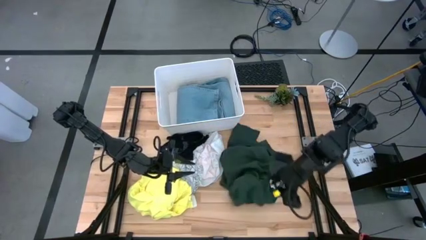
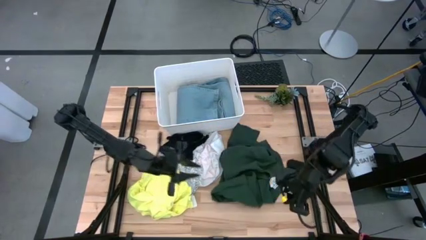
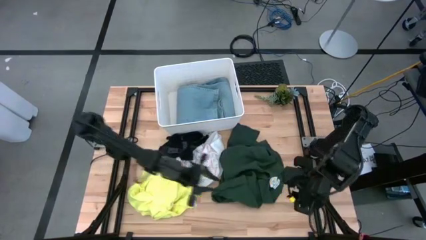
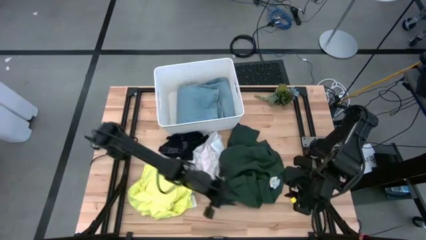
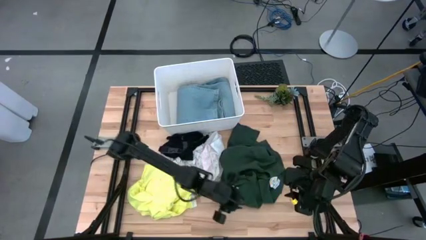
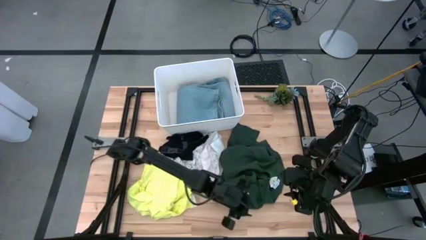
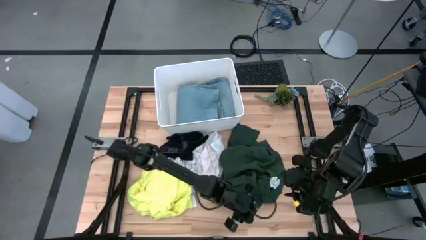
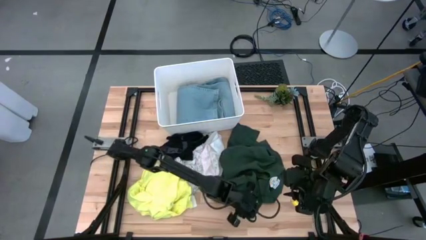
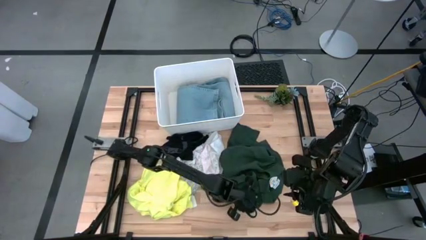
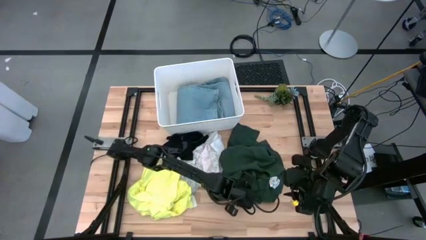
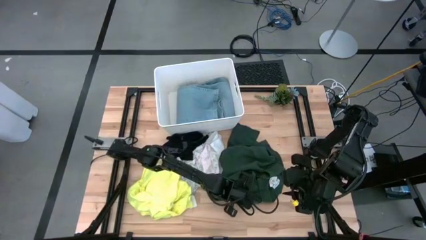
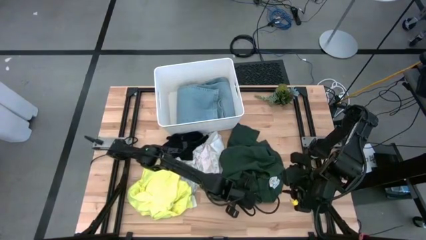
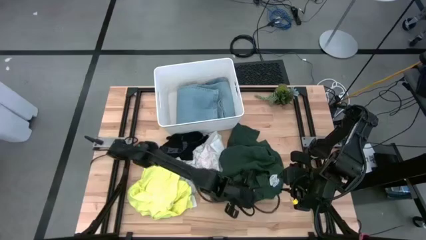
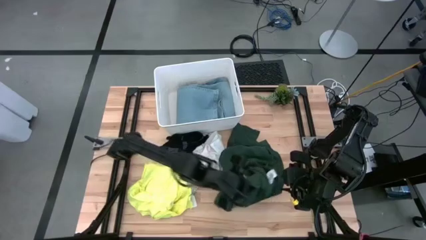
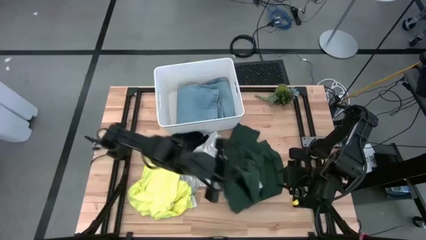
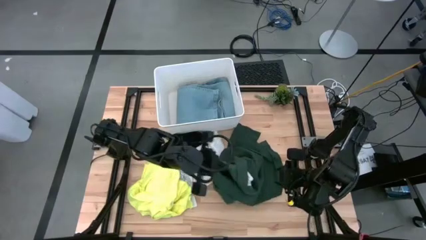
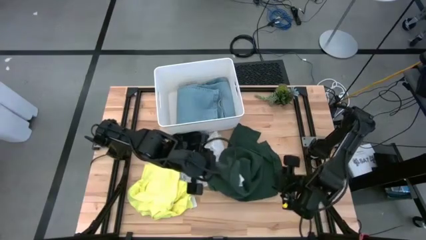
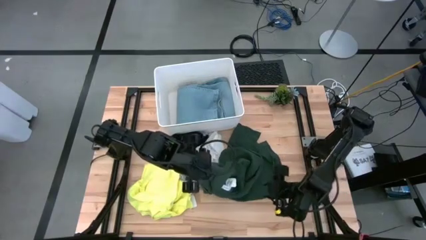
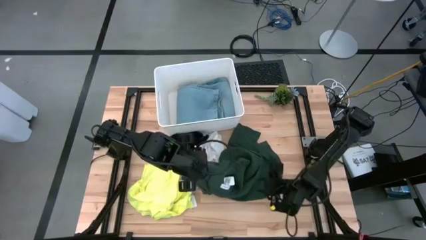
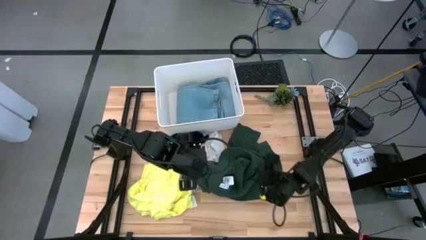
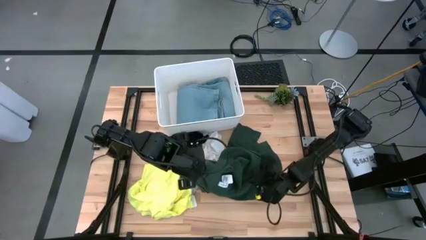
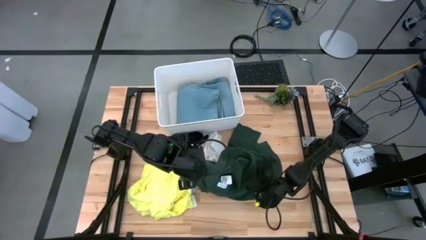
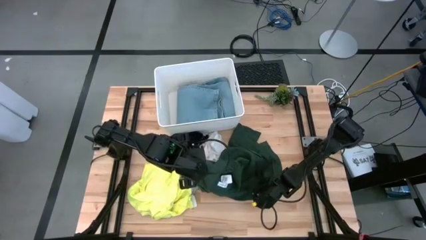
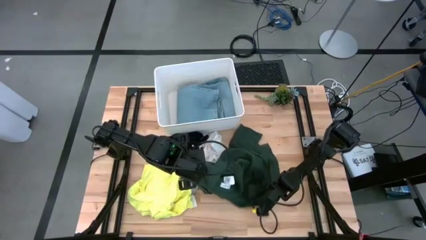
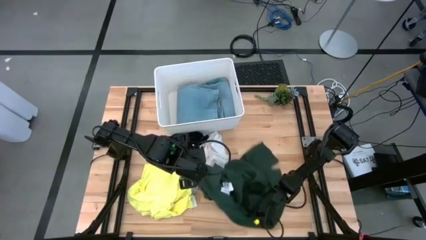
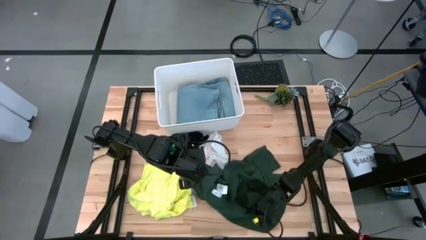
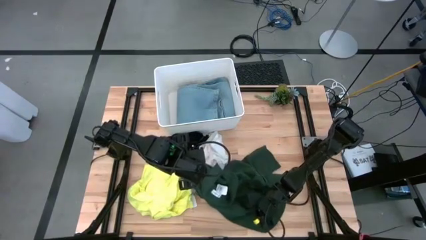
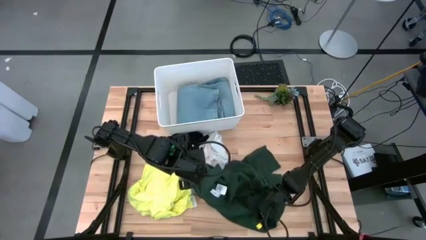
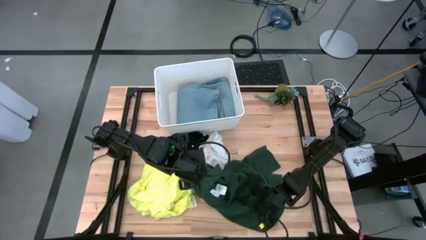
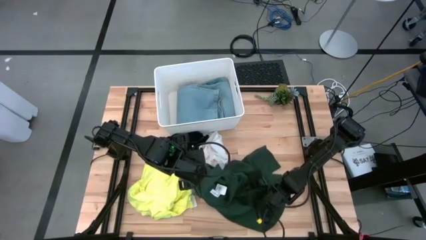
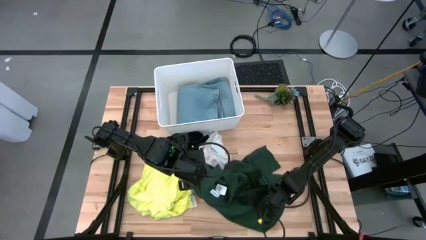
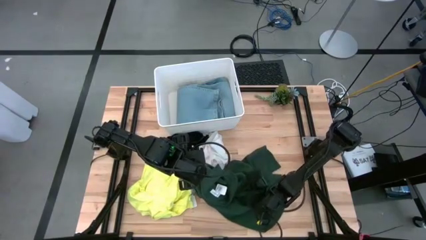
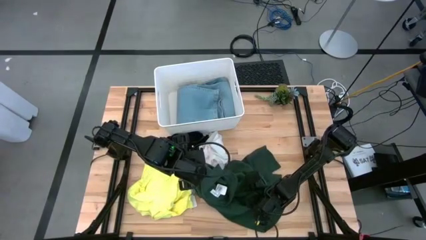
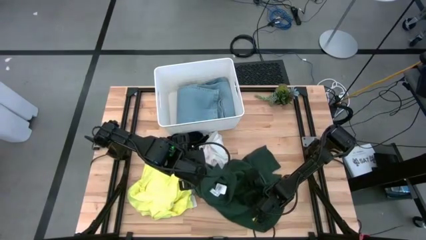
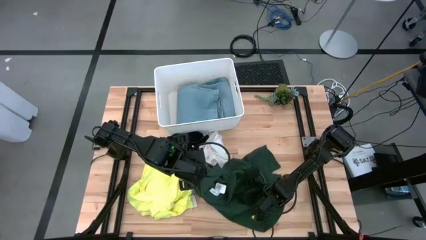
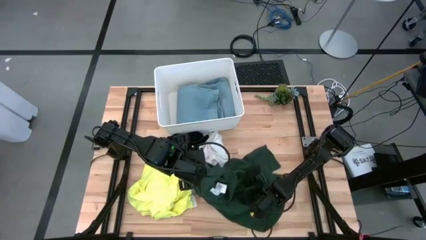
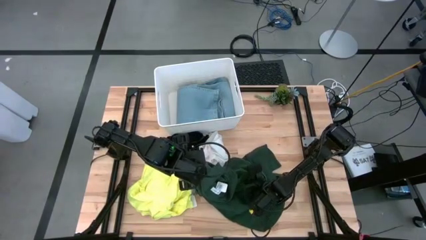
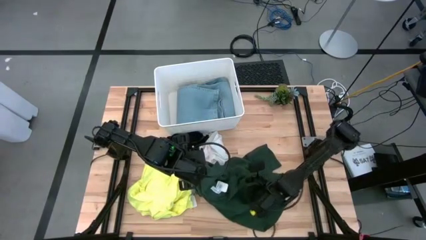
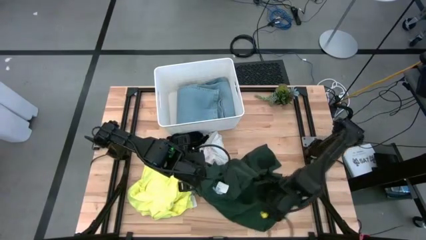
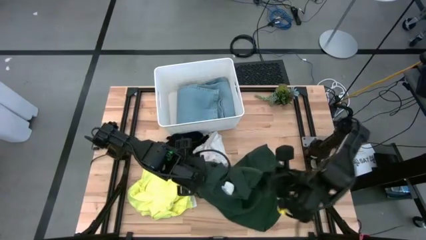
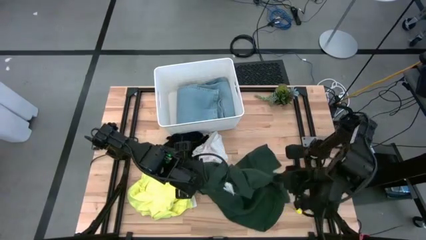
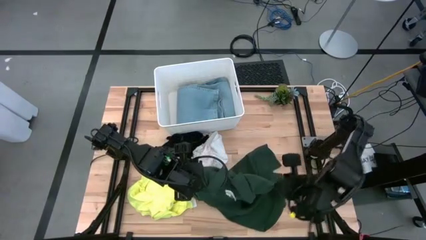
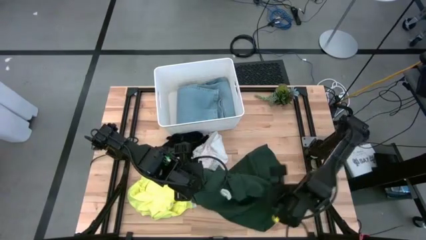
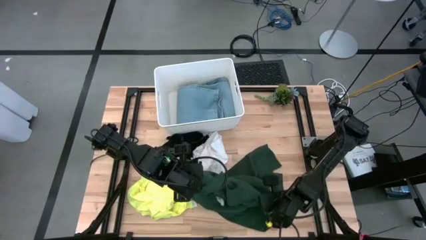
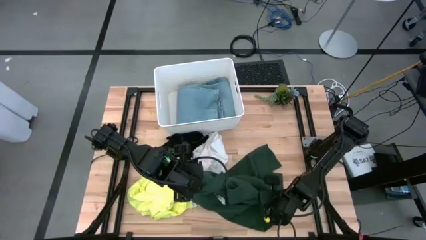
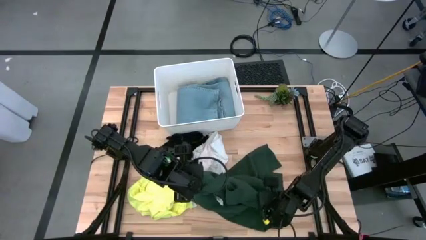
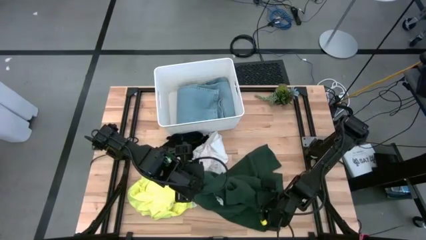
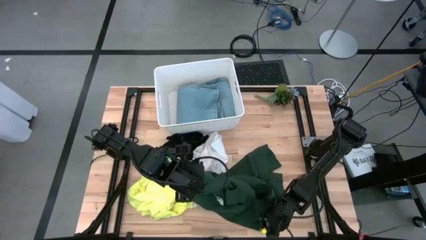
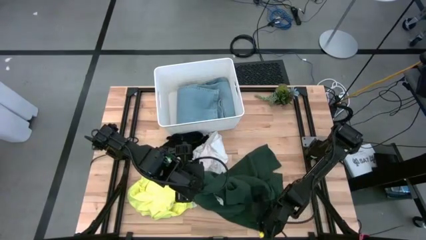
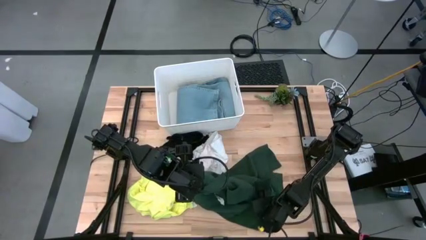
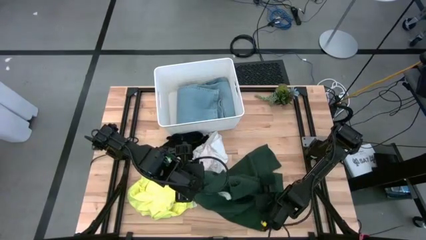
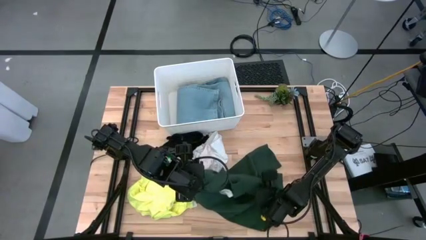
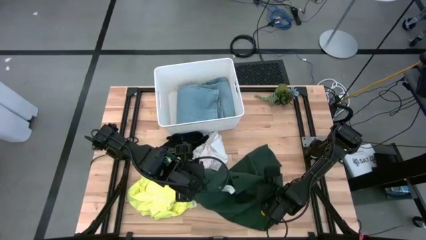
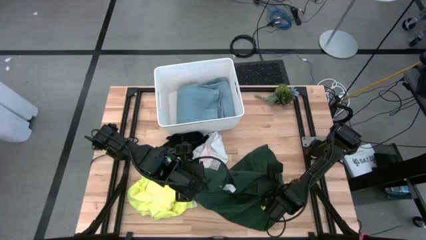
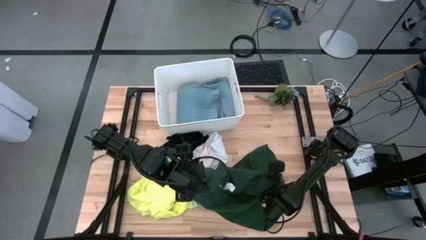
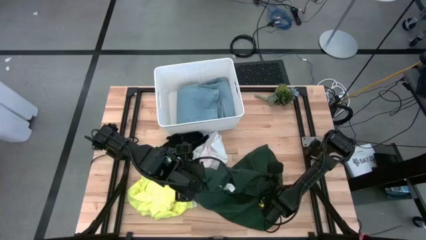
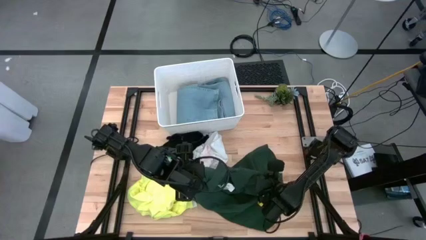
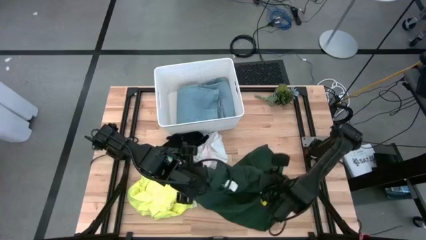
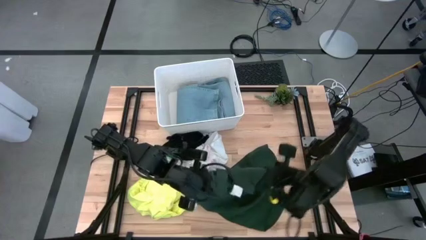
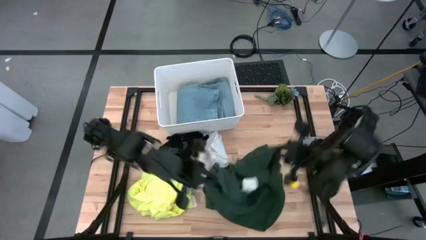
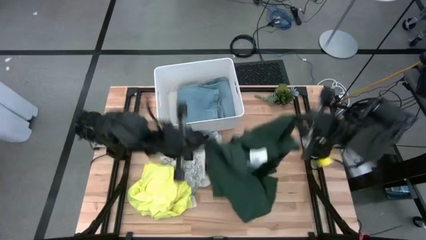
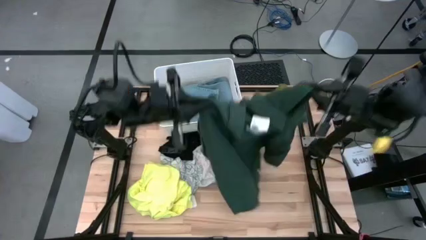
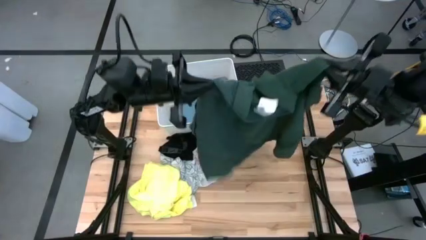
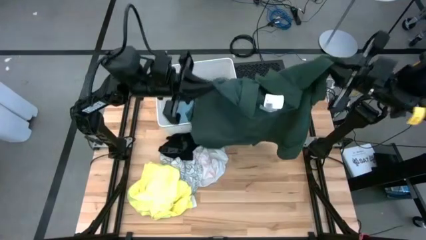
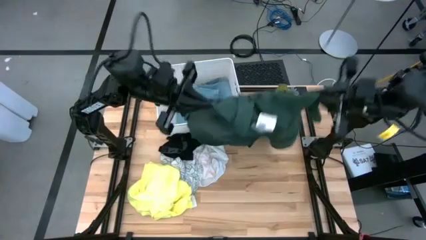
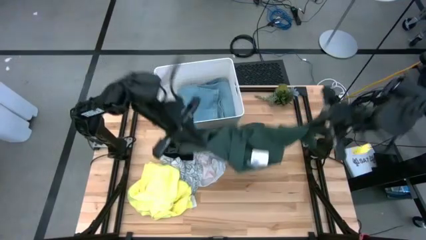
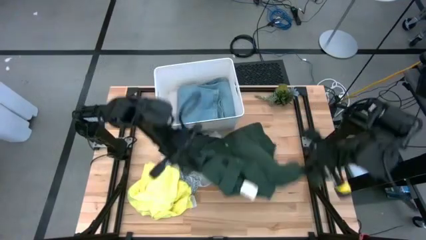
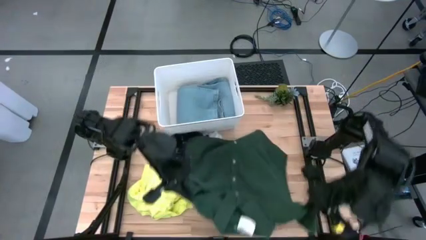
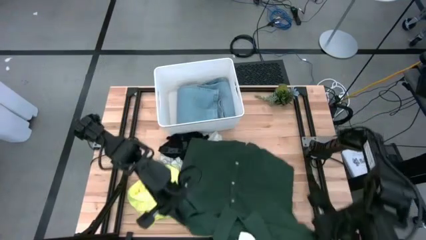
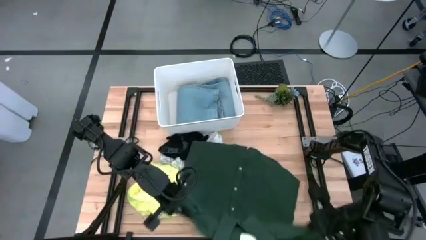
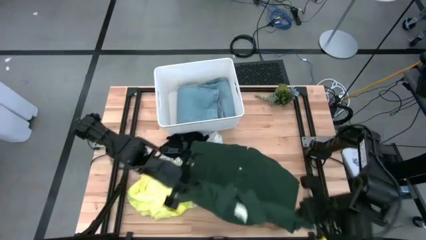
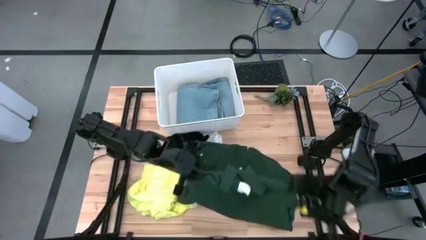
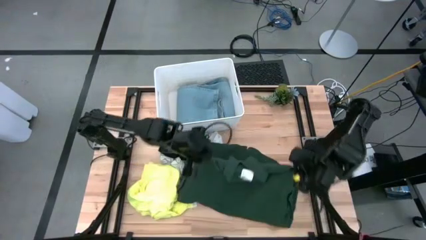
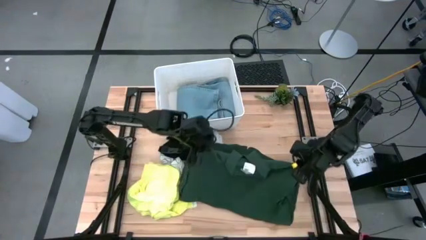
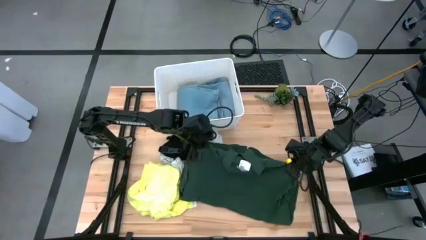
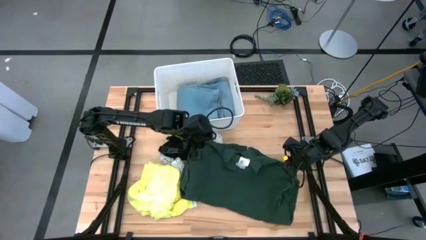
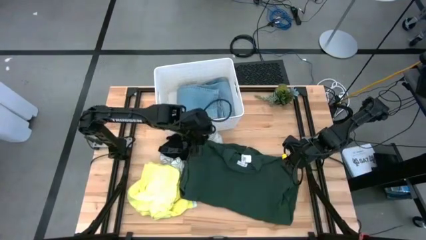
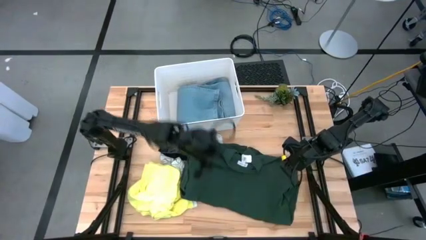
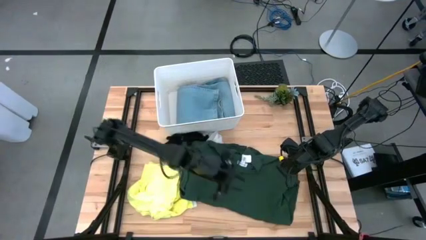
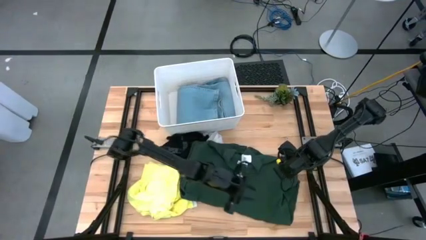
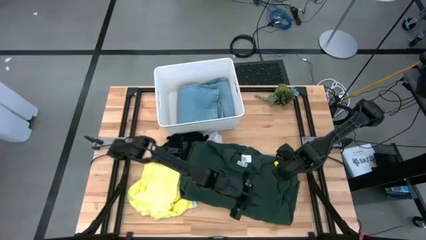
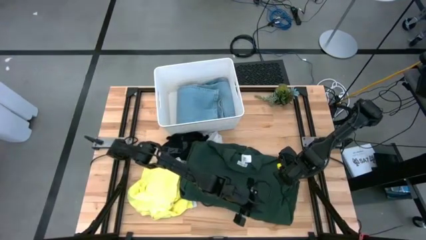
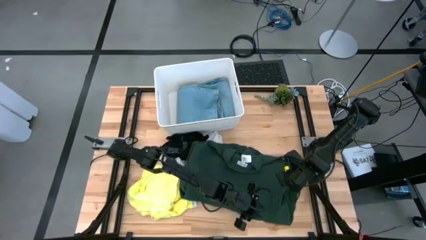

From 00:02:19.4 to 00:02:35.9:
Task: Fold laundry
Fold the green polo shirt
